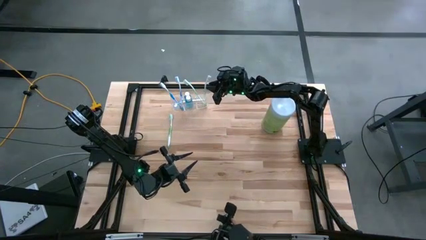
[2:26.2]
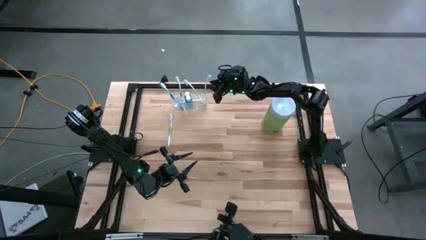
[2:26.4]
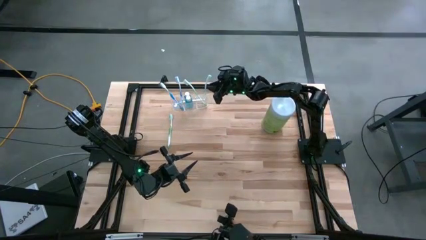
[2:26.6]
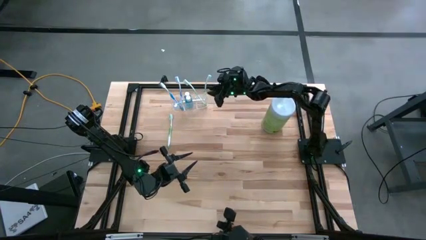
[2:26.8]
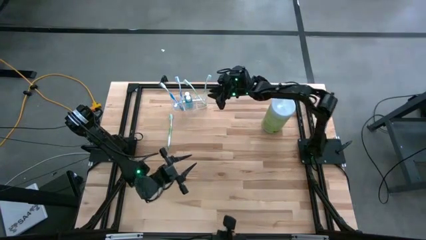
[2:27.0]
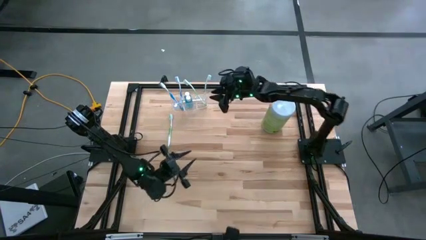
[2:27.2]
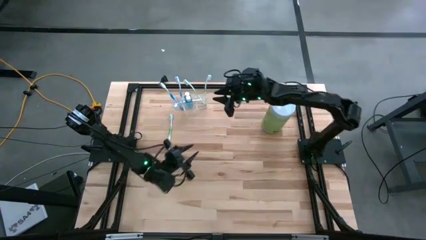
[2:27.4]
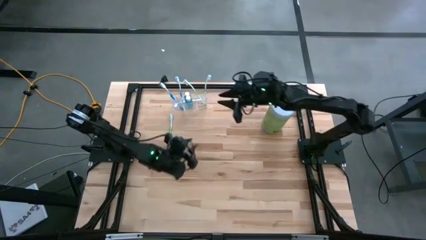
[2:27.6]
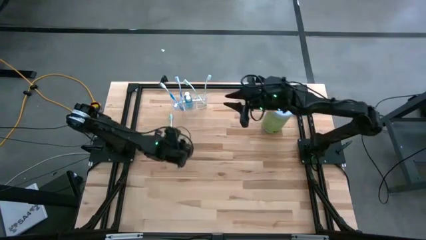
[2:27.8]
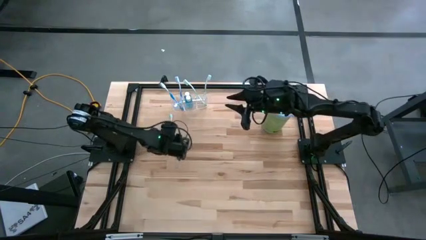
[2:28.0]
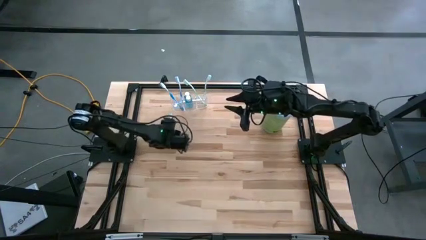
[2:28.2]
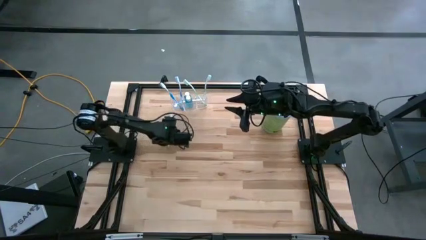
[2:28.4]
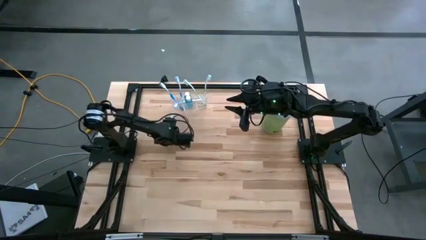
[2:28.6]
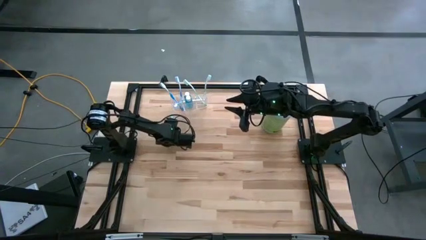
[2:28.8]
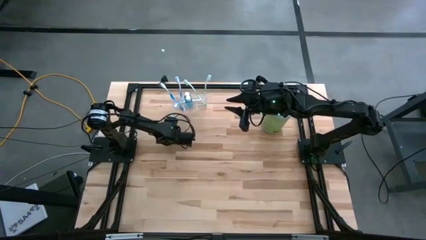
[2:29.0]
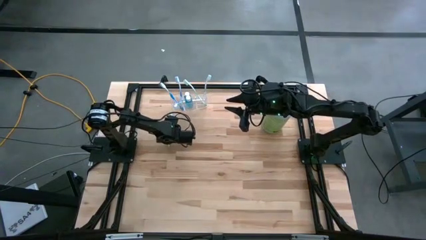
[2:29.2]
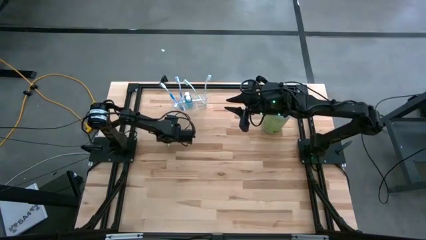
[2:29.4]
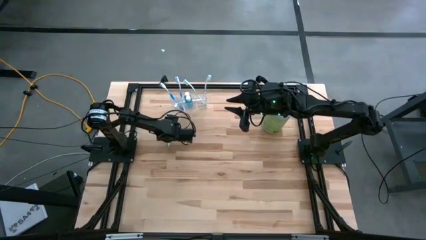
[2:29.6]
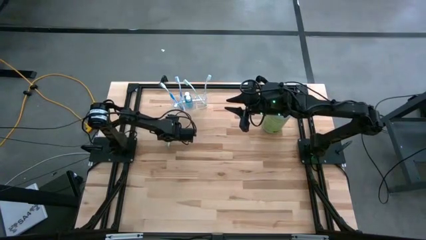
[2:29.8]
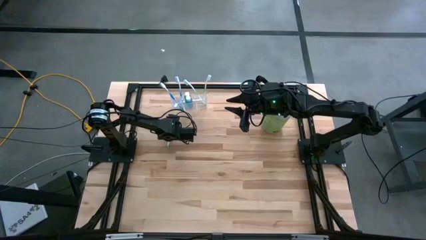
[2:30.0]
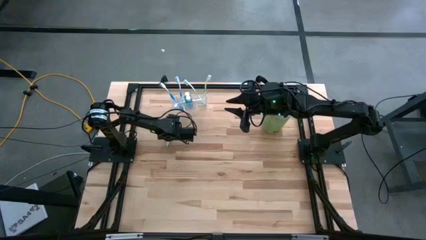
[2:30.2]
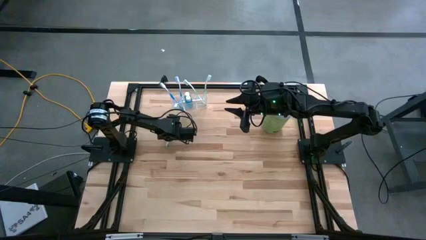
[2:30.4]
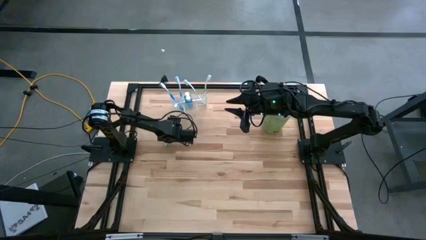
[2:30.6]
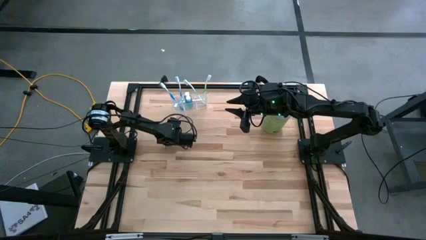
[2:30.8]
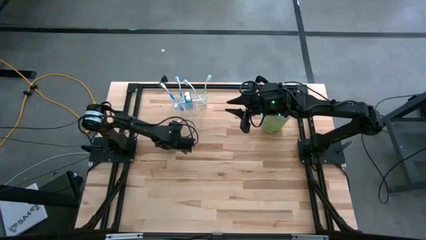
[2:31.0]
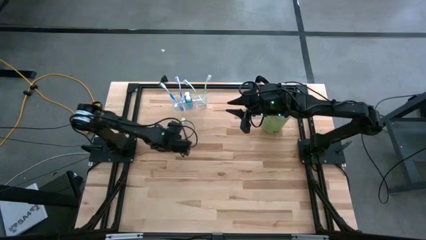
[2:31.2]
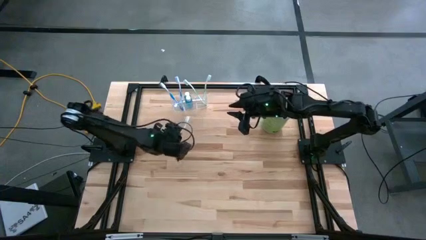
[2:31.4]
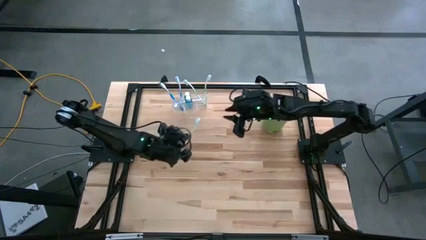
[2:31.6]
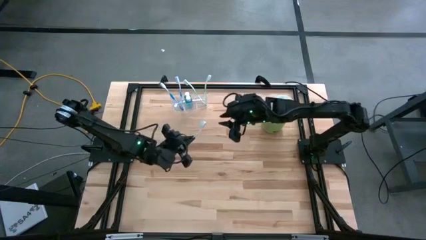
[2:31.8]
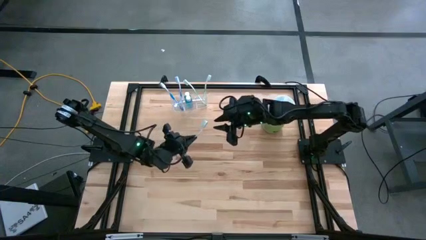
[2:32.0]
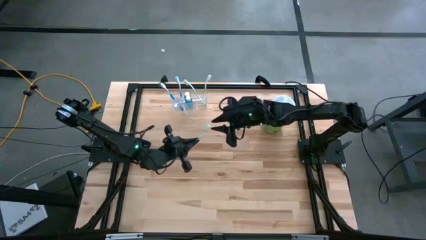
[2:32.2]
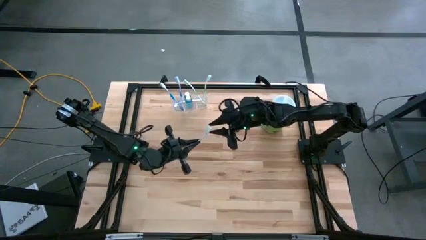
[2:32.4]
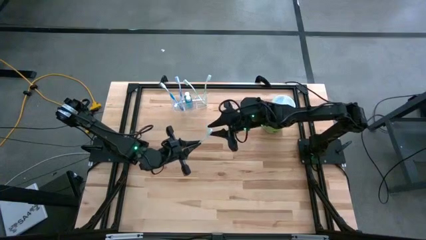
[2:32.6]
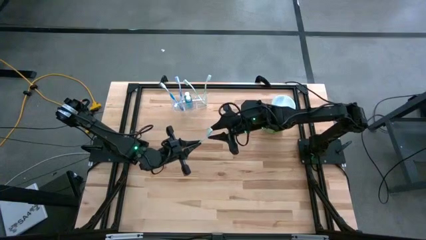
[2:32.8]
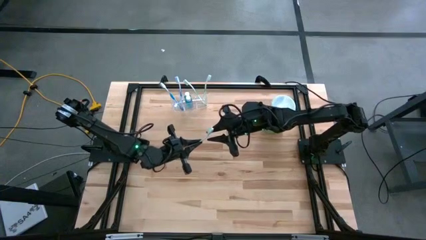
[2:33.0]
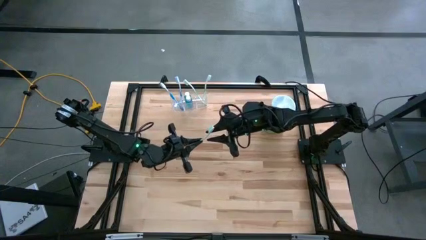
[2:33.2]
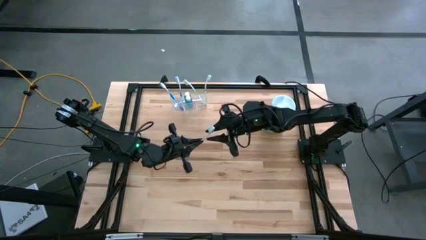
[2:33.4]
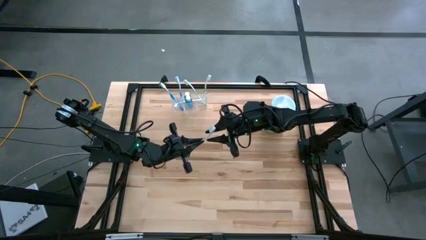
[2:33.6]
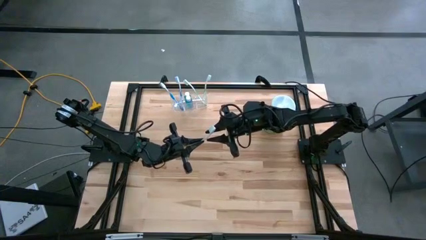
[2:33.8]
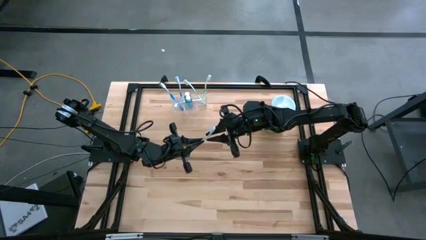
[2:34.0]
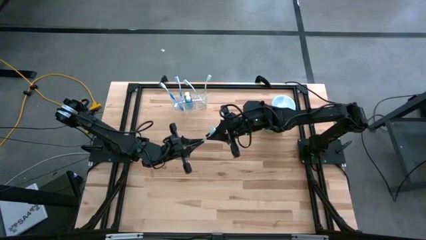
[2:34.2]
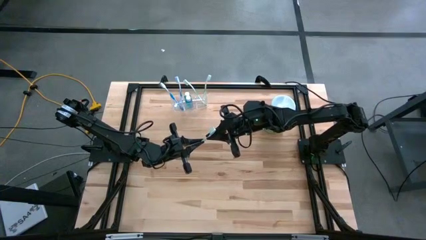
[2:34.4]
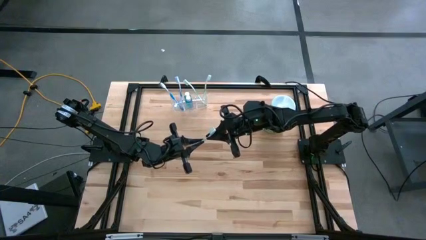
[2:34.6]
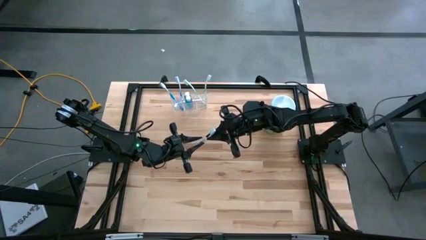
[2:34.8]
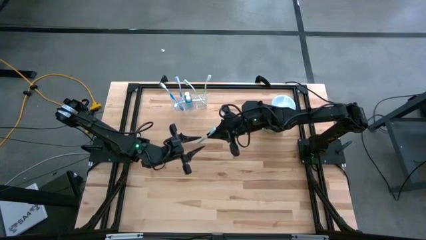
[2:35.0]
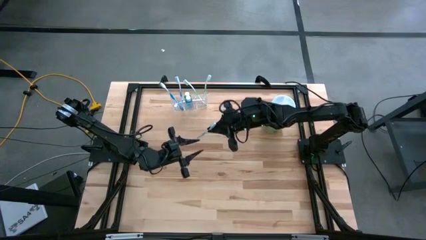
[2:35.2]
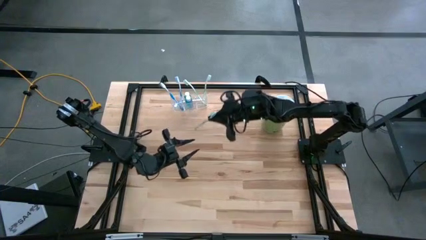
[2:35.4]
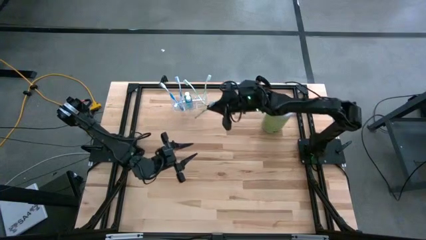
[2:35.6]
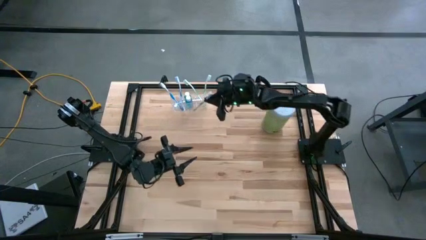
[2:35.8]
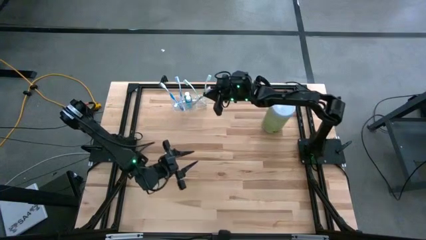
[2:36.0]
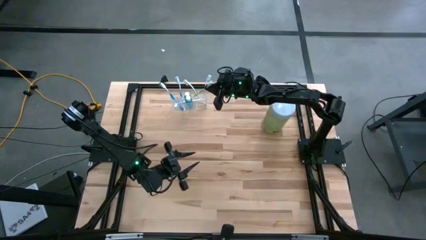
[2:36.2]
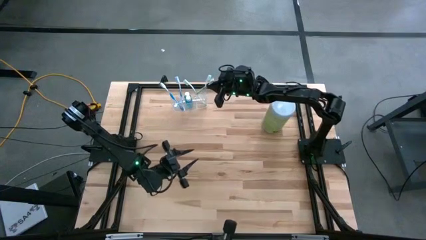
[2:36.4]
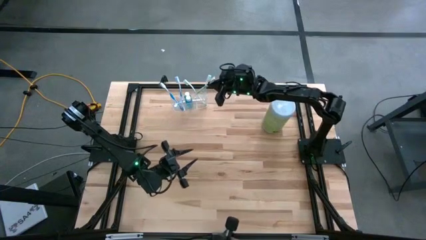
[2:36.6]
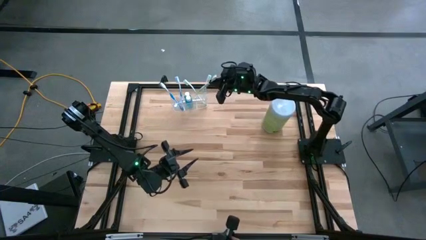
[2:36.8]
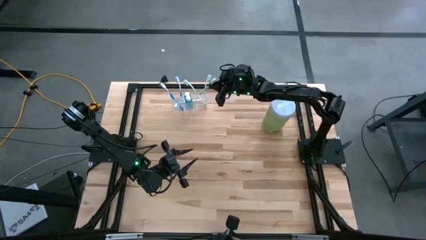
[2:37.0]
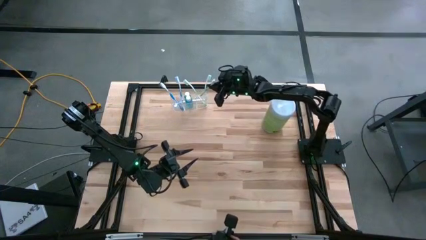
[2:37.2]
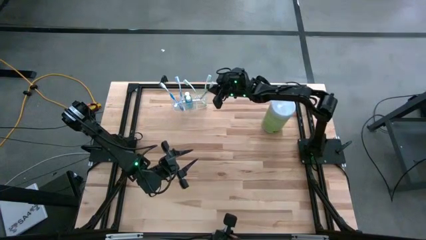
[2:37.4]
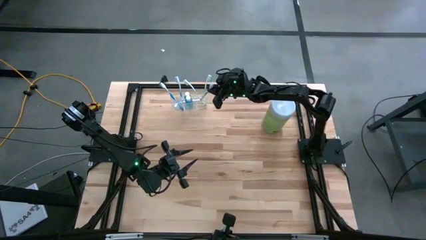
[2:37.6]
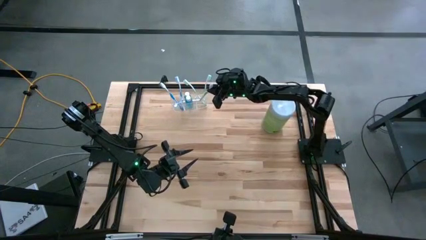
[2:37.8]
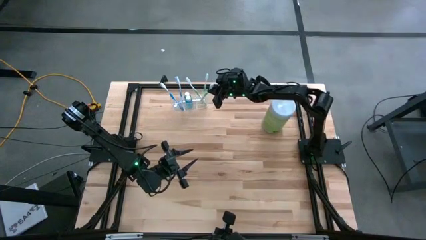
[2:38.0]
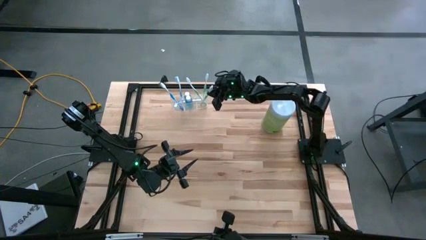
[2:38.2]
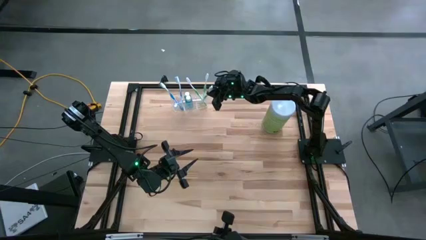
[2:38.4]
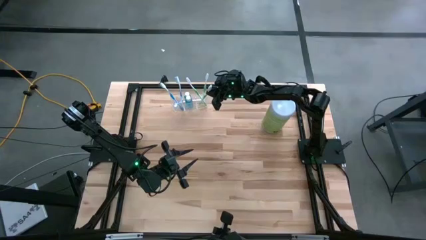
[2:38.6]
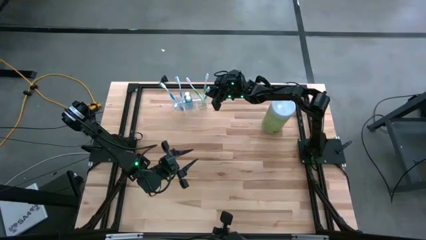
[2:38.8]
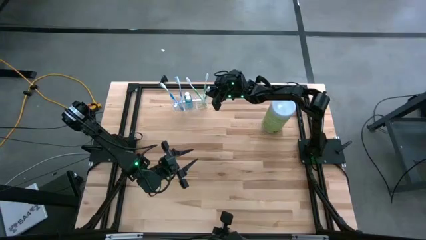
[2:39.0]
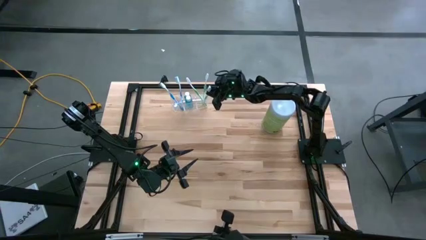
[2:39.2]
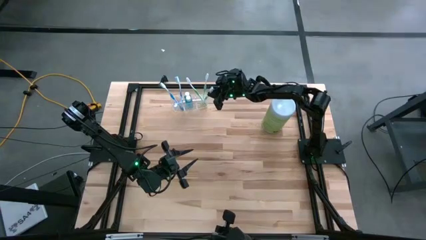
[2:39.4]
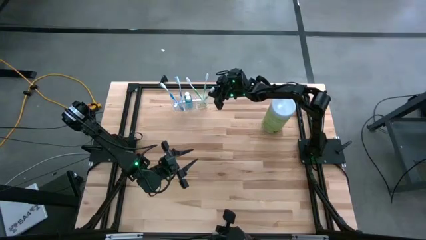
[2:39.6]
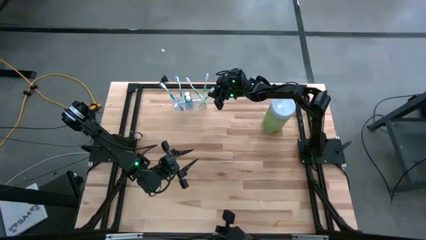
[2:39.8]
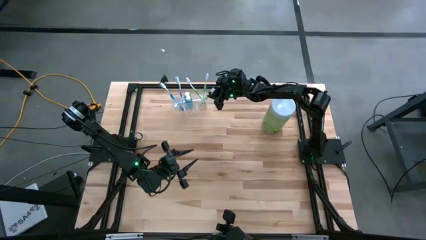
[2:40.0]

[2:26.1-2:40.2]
Task: Pick & Place toothbrushing station
Put the green toothbrush into the right section of the transparent organizer

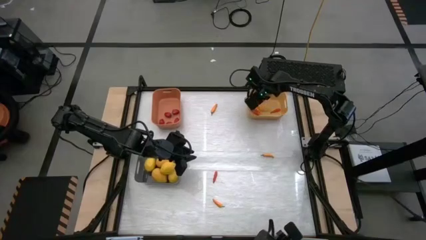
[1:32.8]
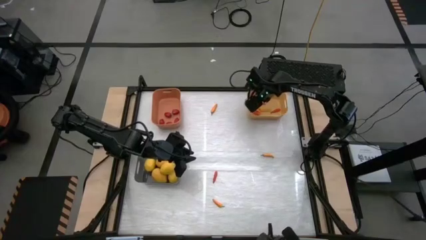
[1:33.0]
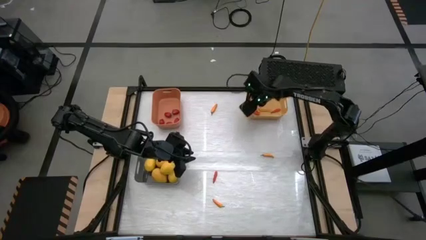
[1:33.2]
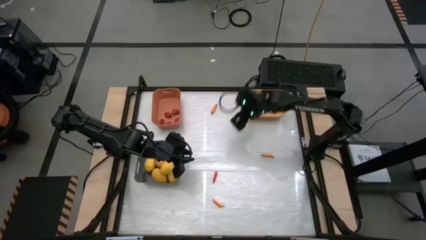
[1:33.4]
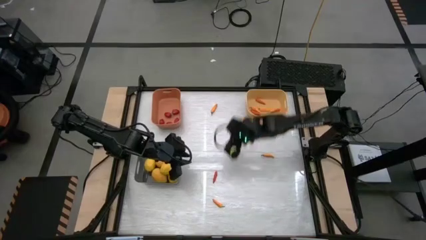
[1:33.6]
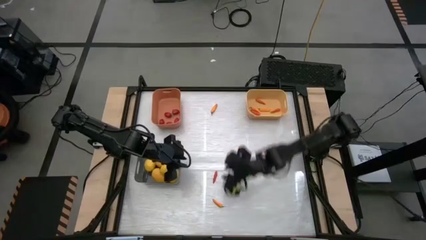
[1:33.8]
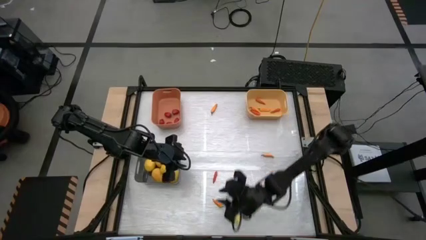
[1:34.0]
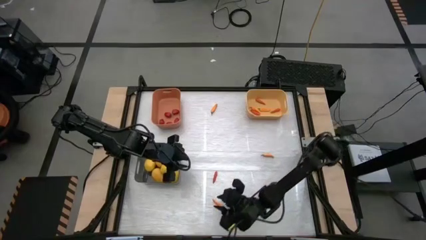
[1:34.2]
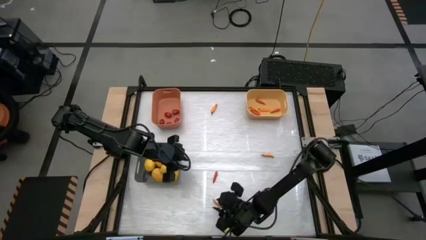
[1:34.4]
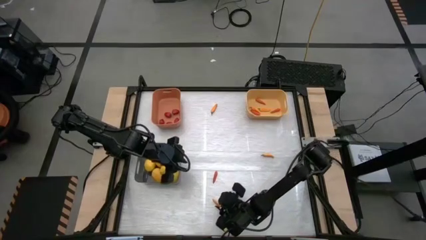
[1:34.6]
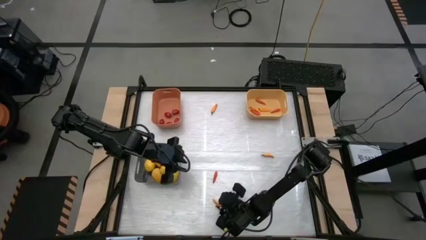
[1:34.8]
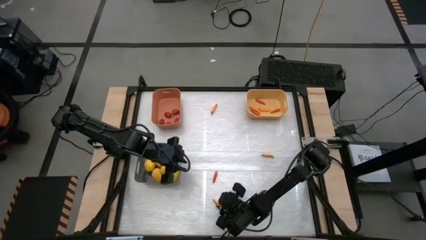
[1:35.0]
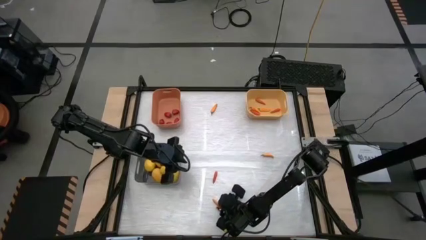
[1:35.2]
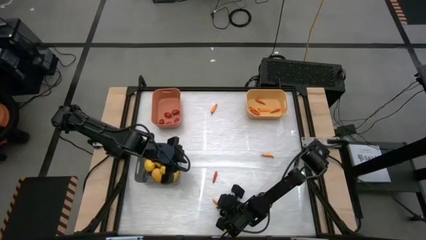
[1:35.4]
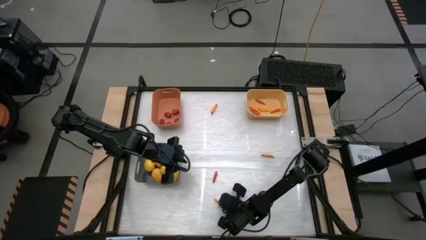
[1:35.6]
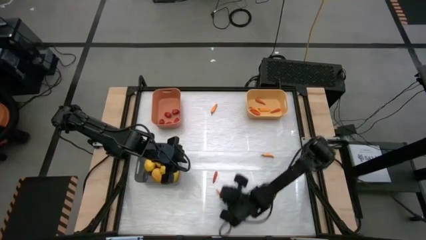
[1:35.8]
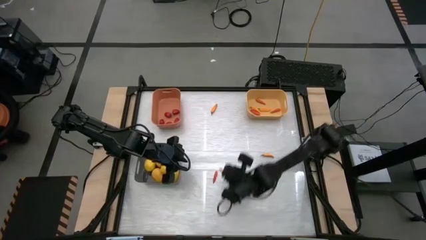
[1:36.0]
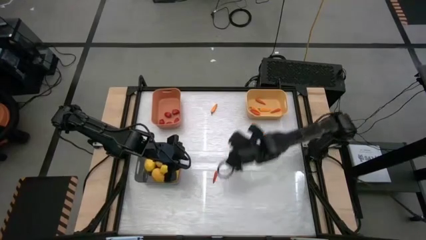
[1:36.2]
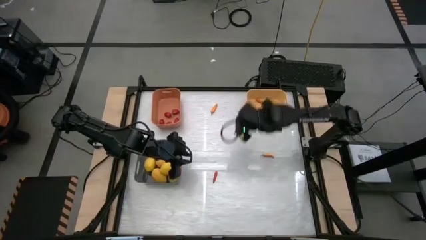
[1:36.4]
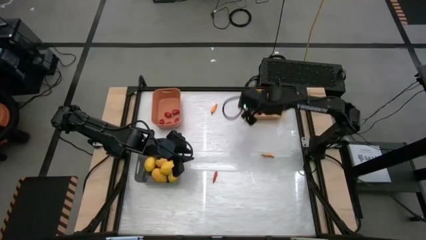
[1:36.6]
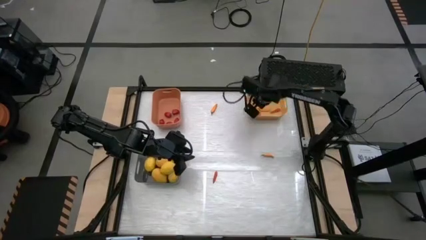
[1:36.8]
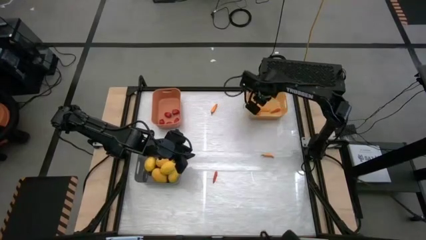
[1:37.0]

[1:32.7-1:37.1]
Task: Sort produce into baskets
Put the yellow chili pepper into the yellow bin
